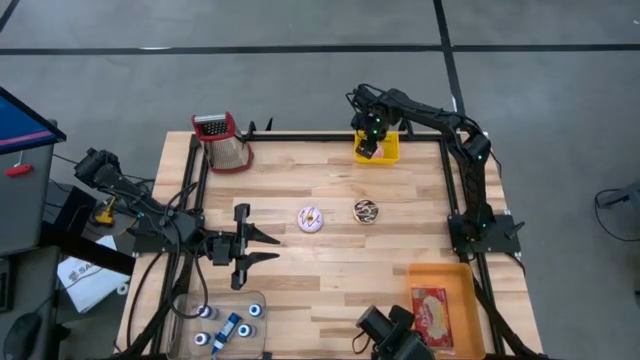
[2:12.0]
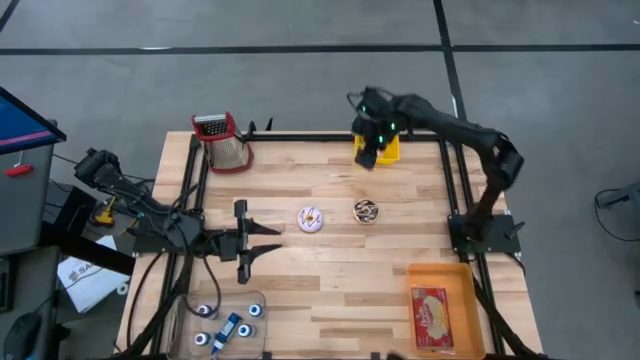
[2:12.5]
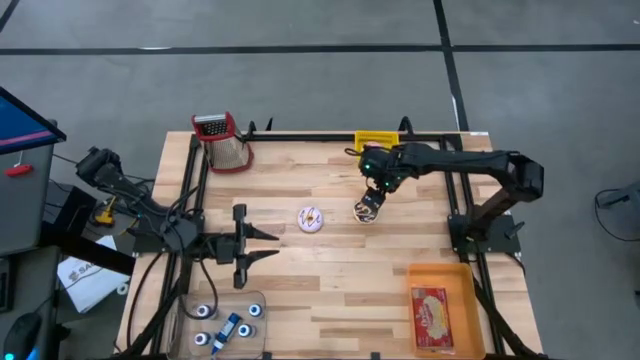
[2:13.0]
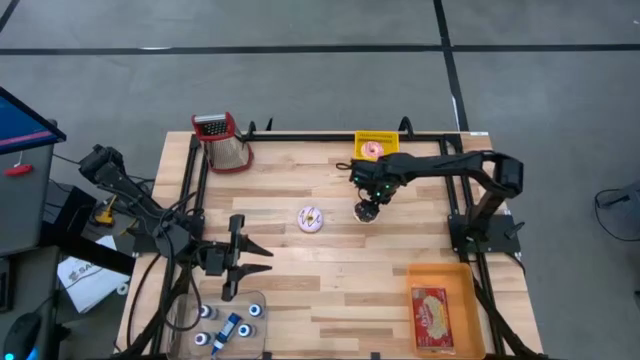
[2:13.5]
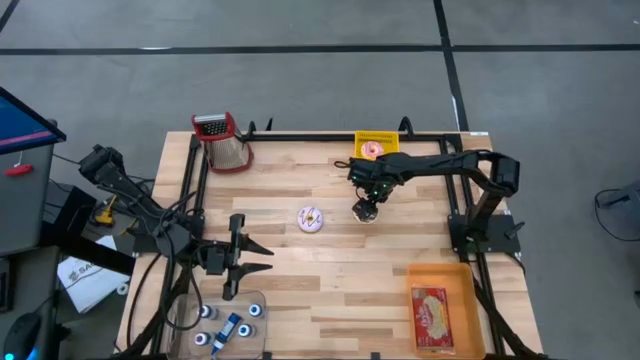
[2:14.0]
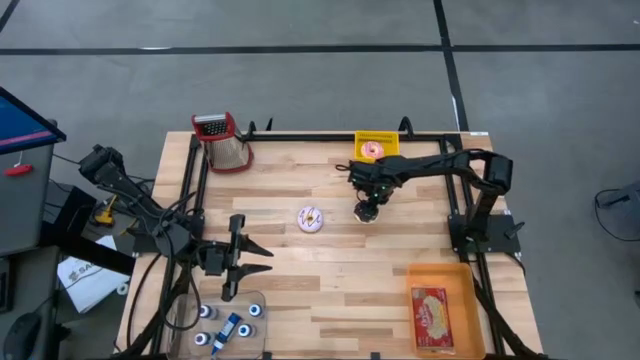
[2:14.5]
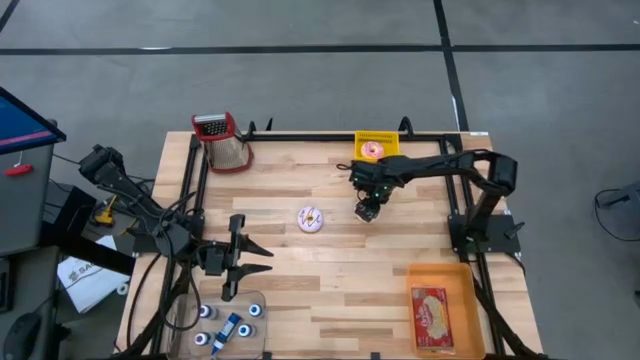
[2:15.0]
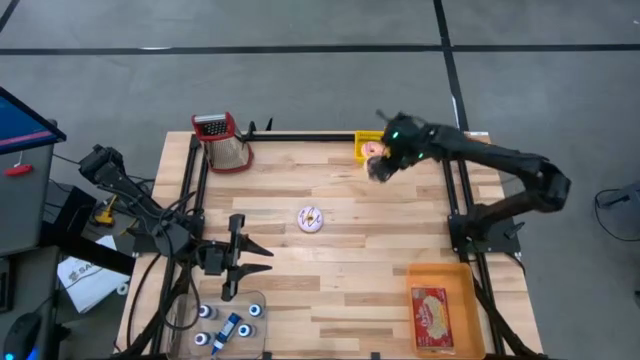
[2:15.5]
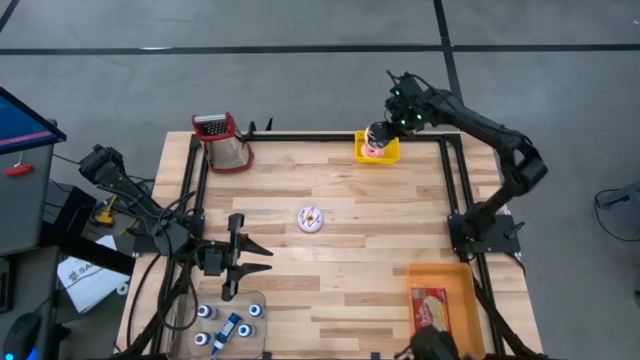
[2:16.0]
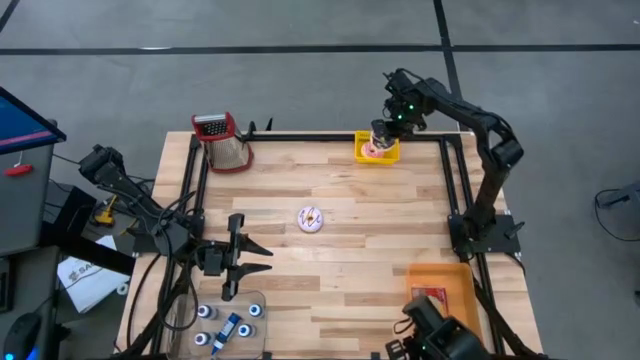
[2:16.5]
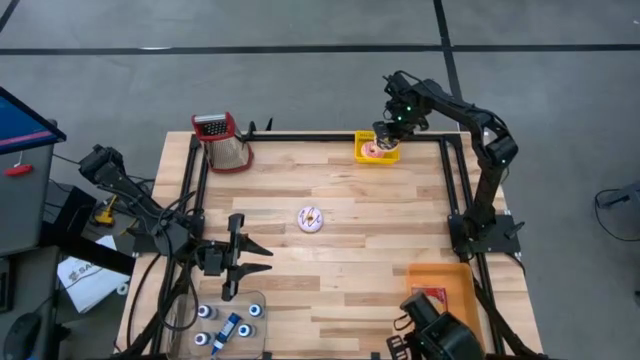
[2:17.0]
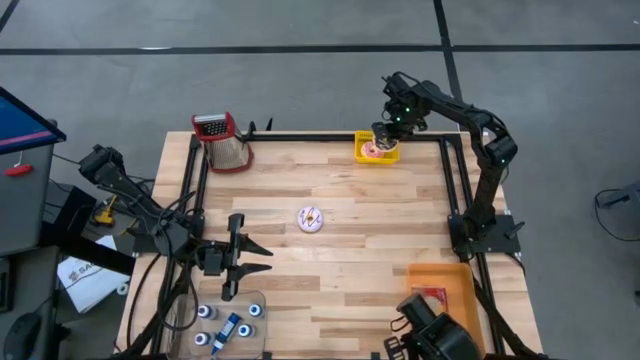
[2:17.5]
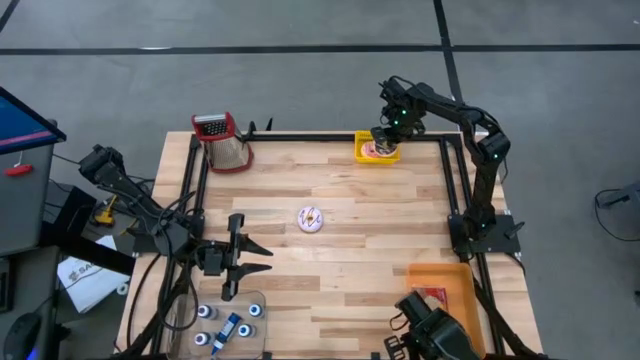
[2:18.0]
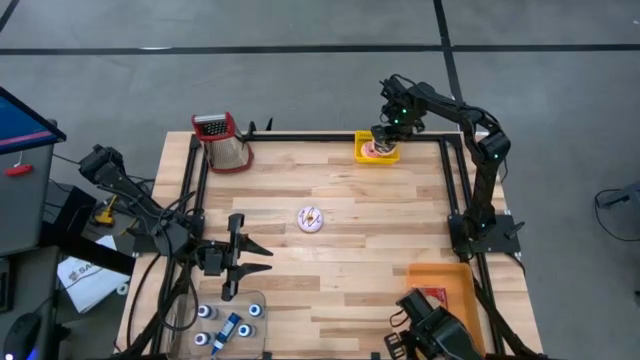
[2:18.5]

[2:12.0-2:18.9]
Put the black donut into the yellow bin

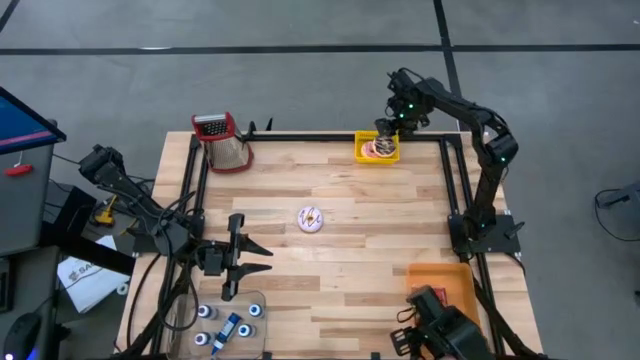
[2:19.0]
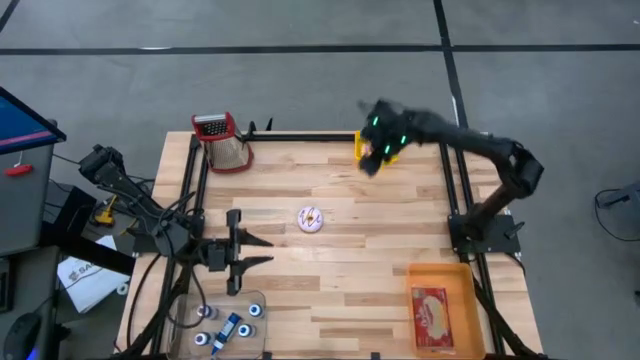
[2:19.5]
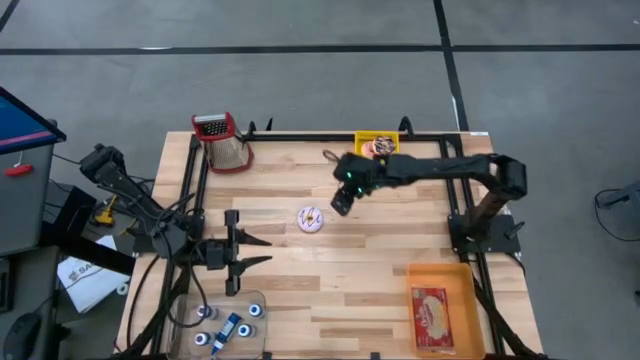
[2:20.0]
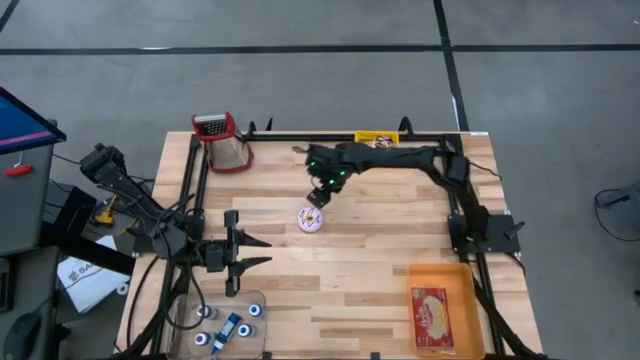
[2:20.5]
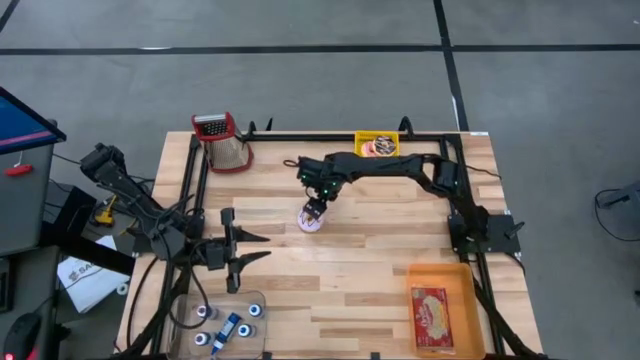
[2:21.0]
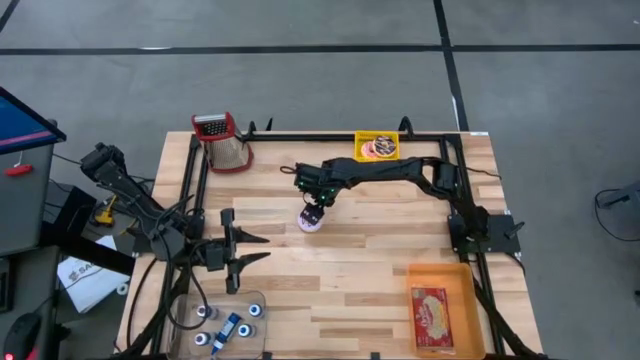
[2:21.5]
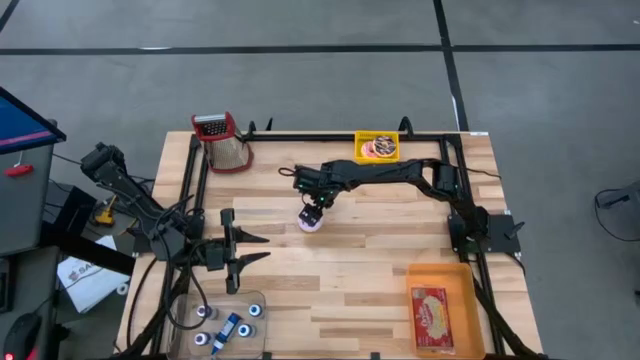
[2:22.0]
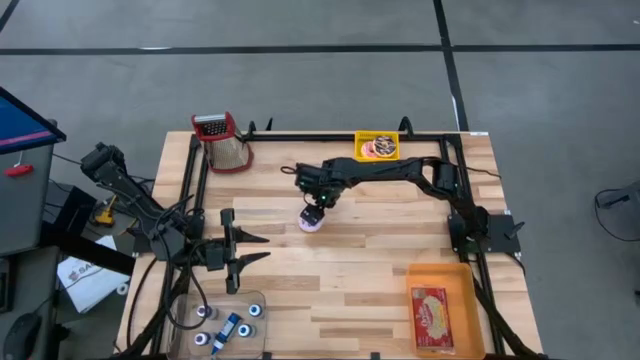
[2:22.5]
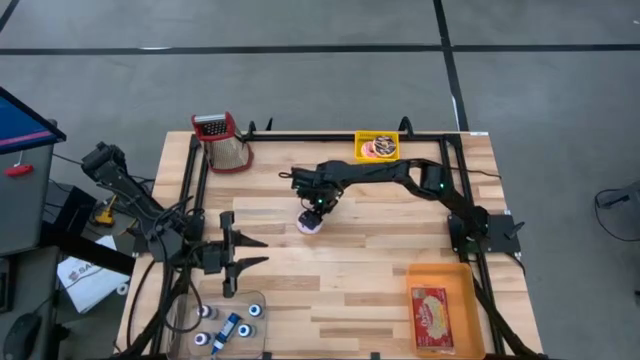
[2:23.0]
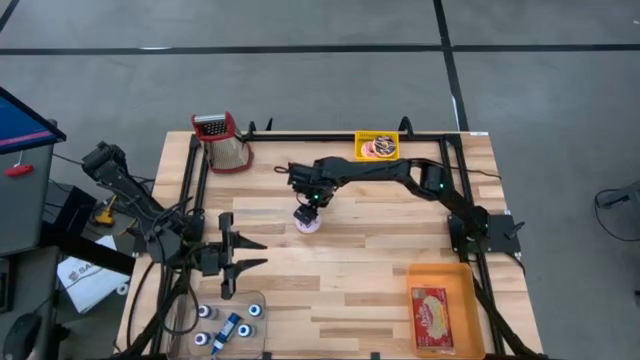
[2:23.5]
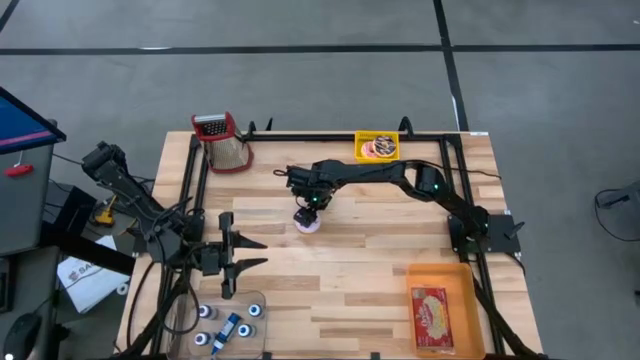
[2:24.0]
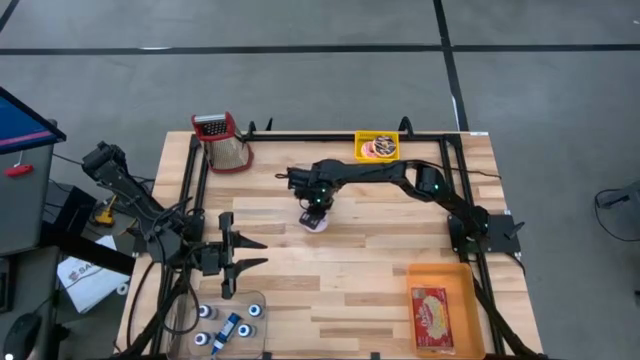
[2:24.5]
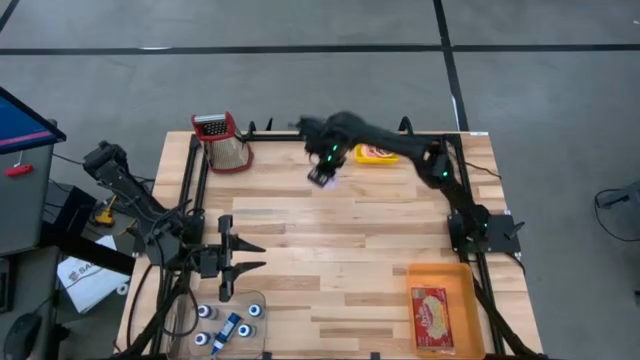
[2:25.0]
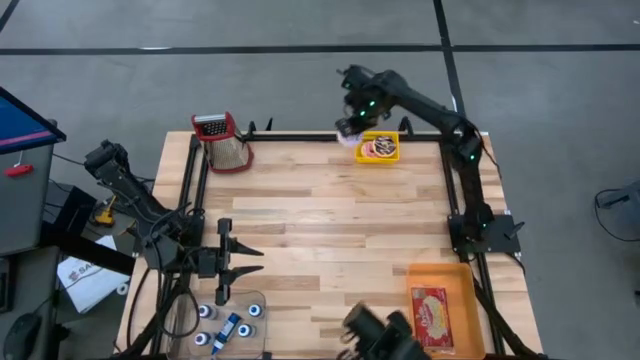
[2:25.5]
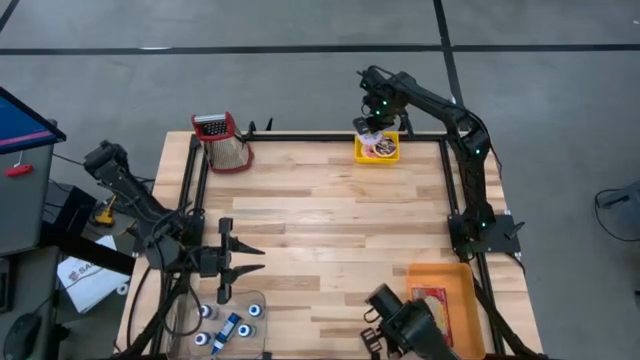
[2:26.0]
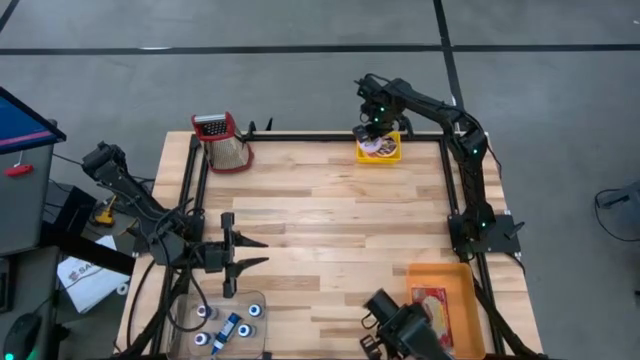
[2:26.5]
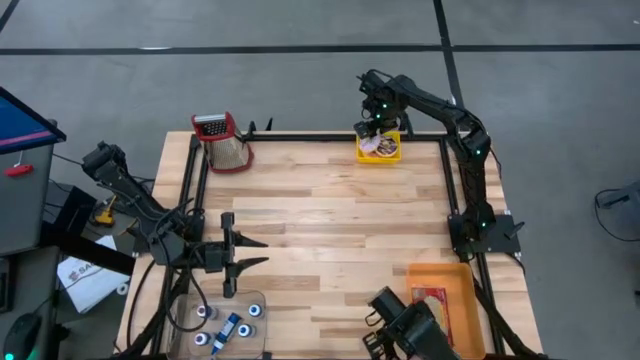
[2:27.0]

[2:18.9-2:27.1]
Put the violet donut into the yellow bin

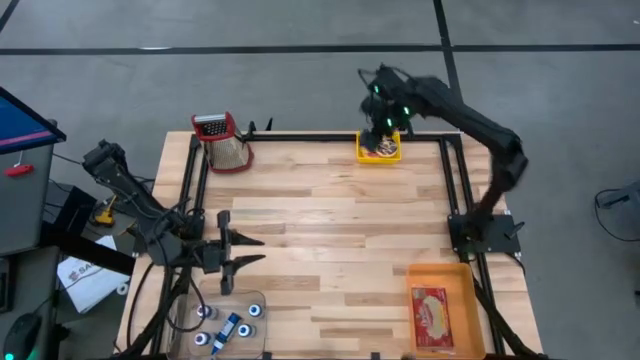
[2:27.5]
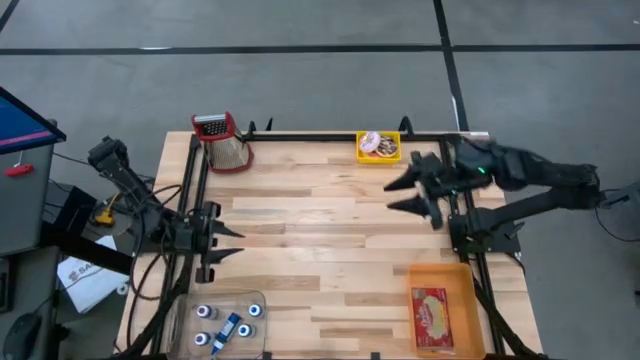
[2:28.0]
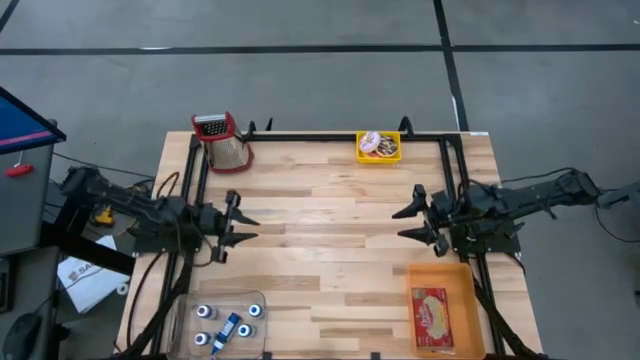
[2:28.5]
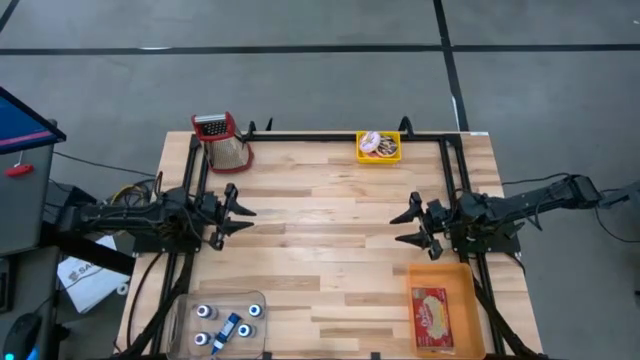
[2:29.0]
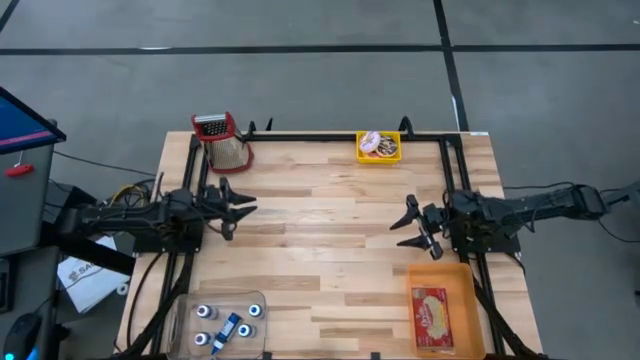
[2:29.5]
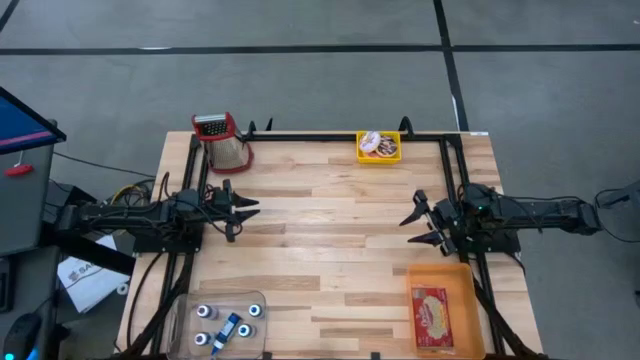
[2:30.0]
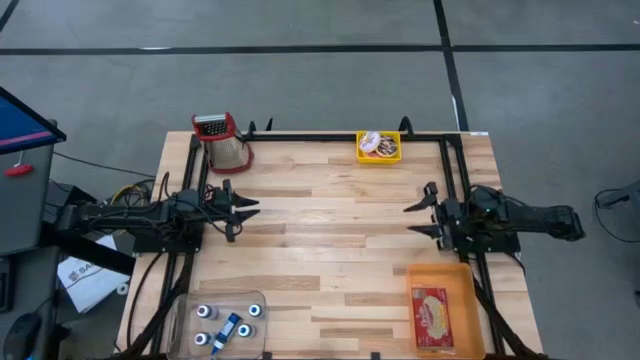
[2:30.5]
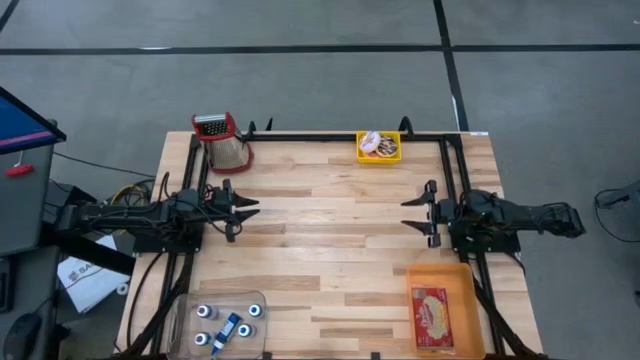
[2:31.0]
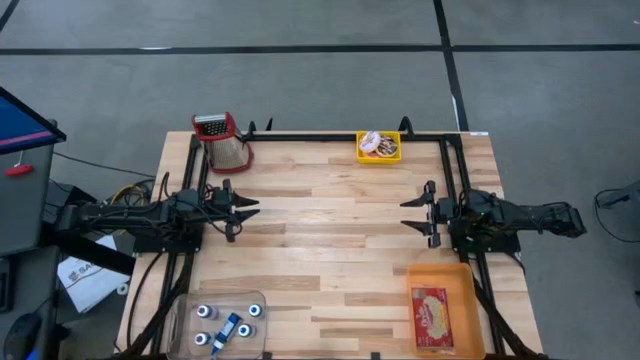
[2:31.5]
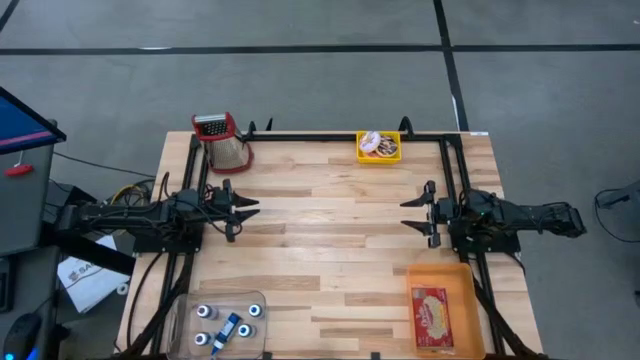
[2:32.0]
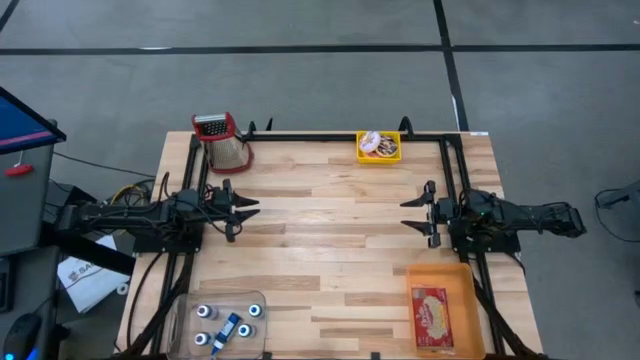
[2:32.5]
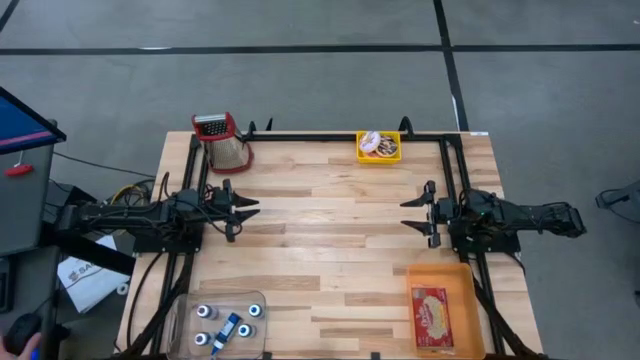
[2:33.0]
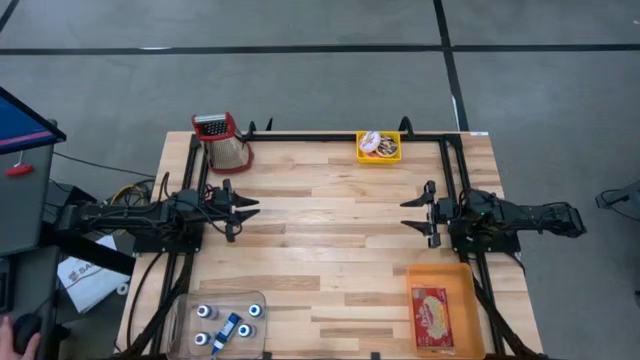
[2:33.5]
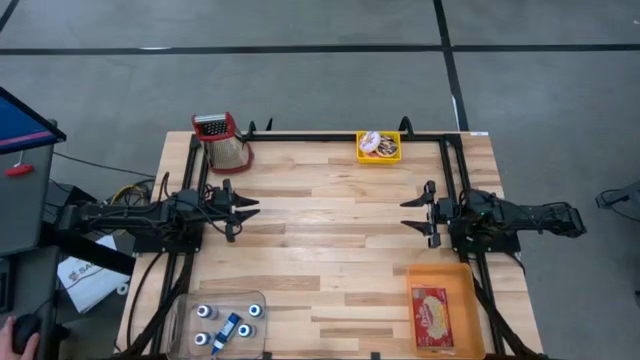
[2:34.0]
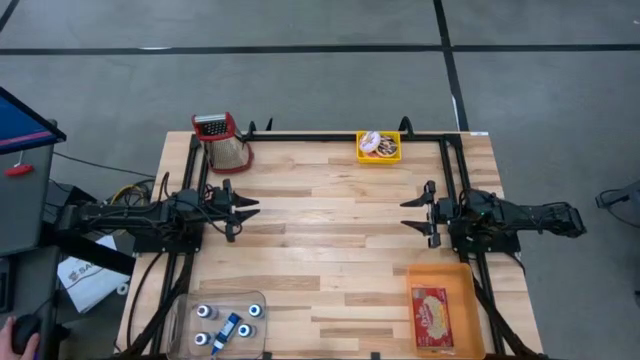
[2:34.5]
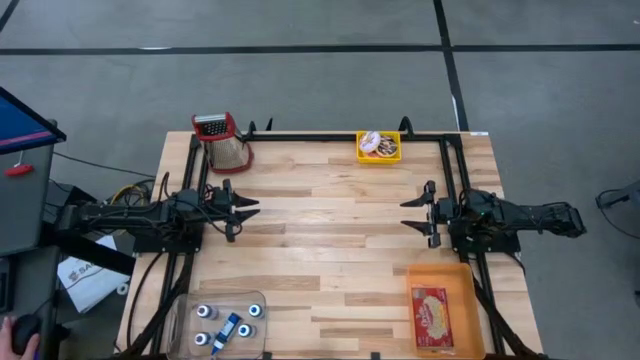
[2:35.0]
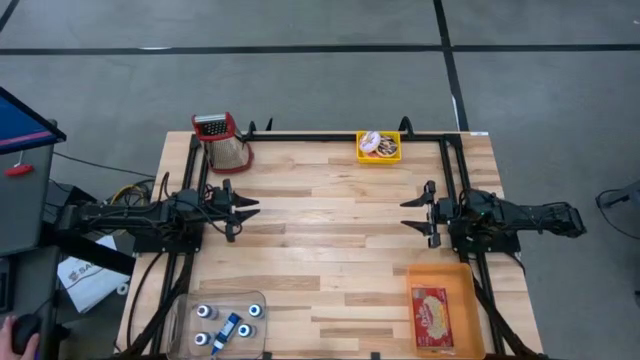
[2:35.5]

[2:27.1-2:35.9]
Return to Home Position
